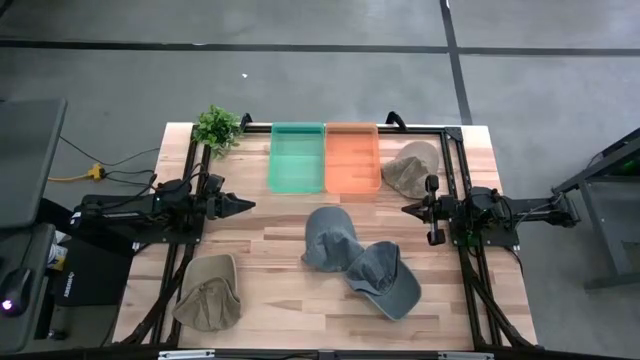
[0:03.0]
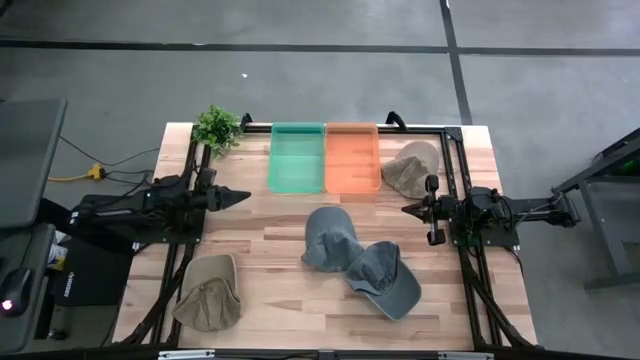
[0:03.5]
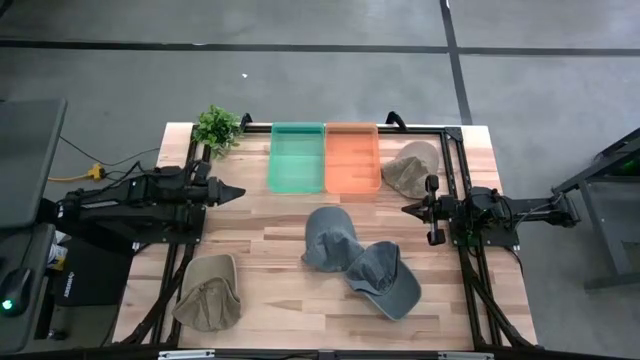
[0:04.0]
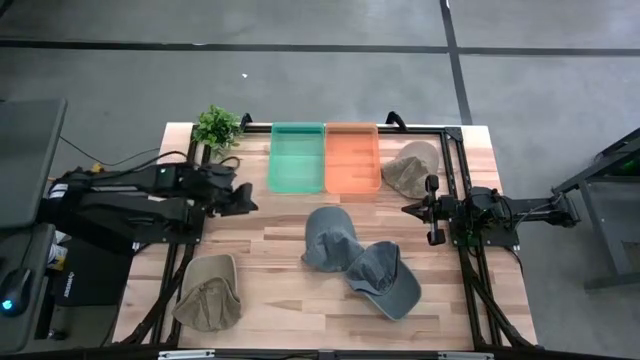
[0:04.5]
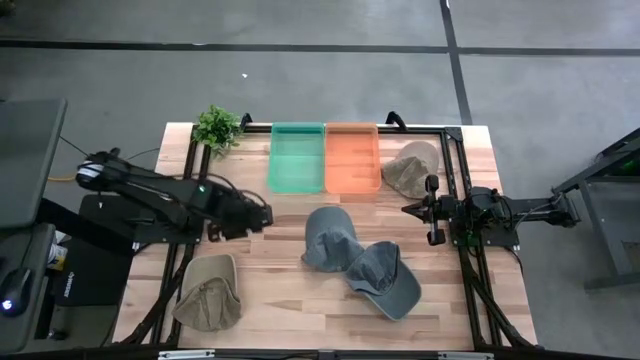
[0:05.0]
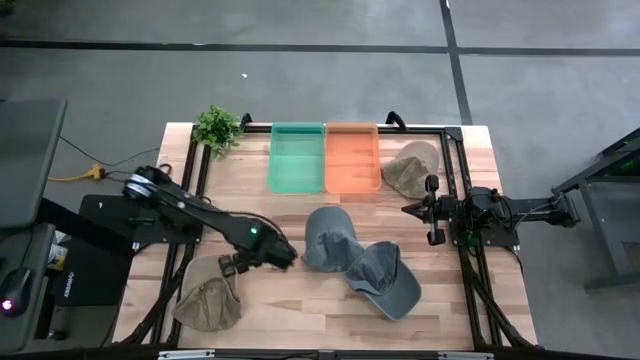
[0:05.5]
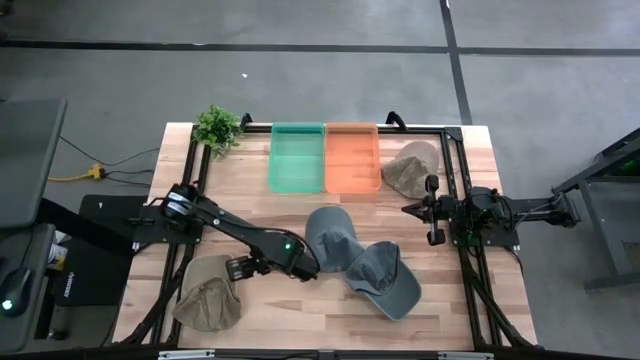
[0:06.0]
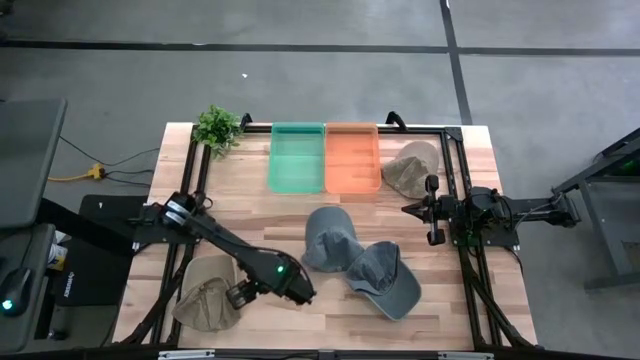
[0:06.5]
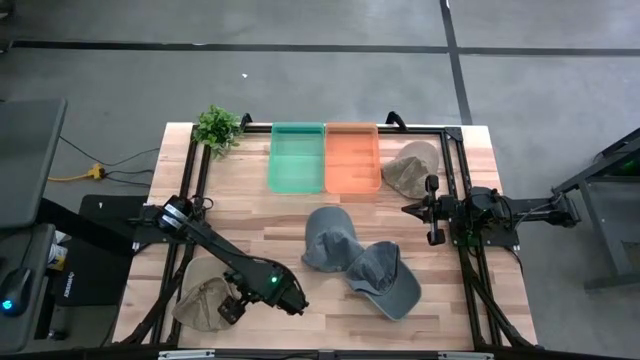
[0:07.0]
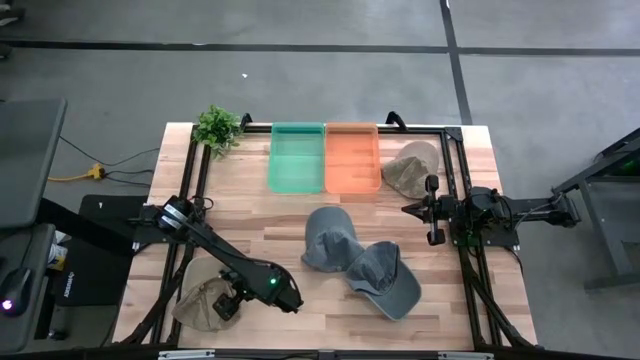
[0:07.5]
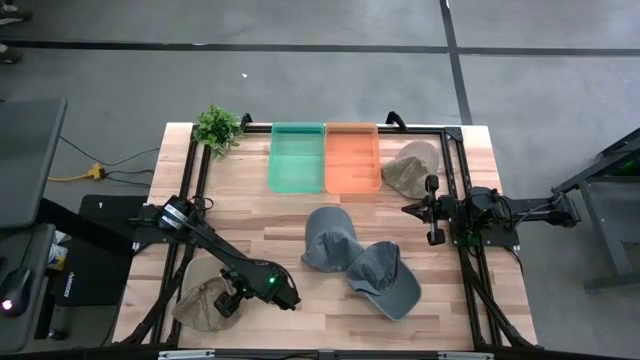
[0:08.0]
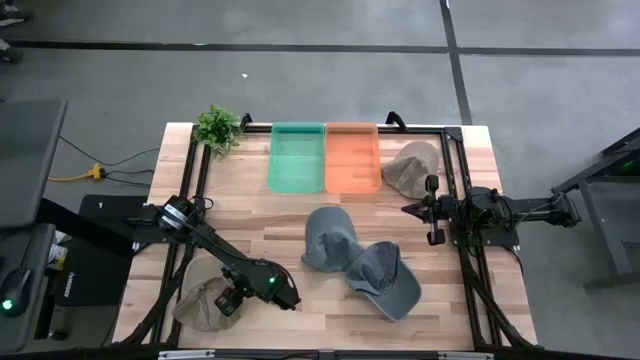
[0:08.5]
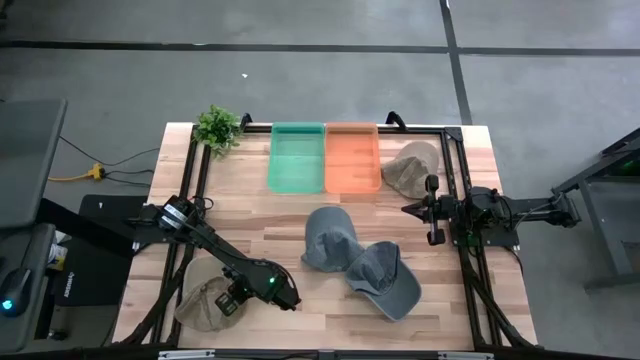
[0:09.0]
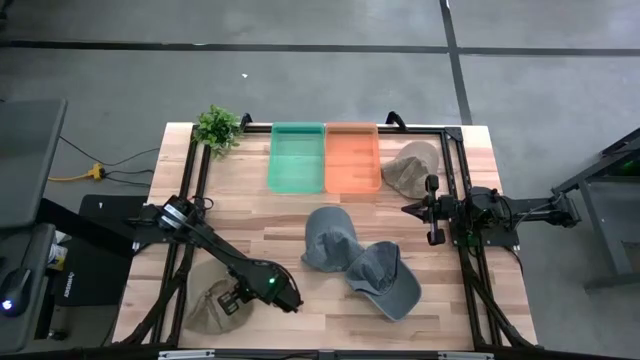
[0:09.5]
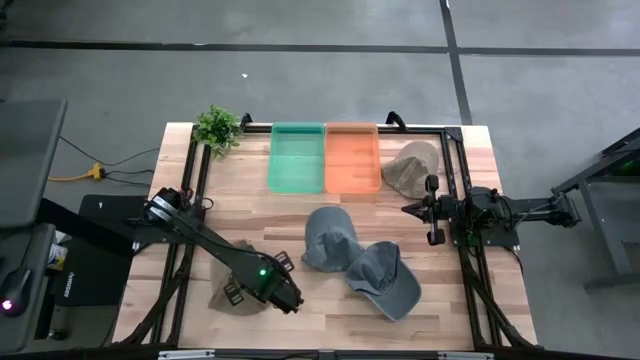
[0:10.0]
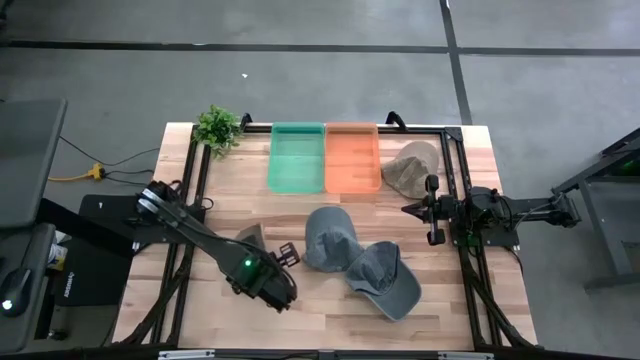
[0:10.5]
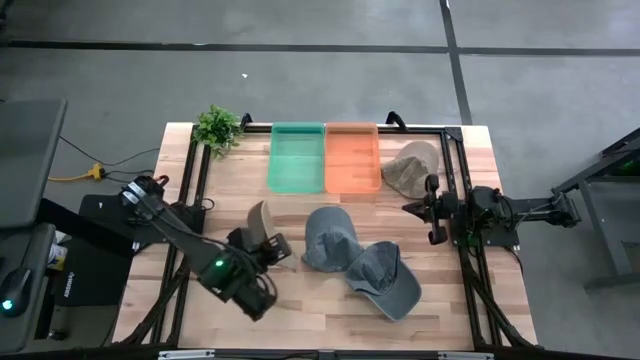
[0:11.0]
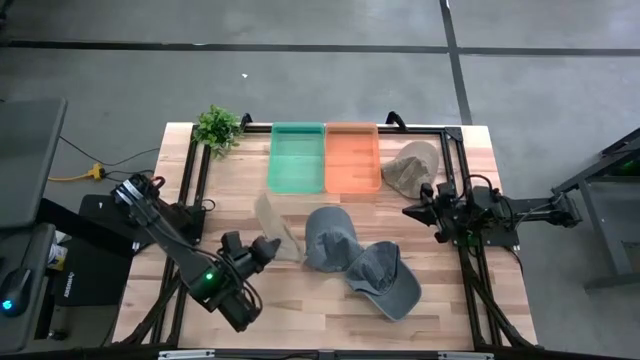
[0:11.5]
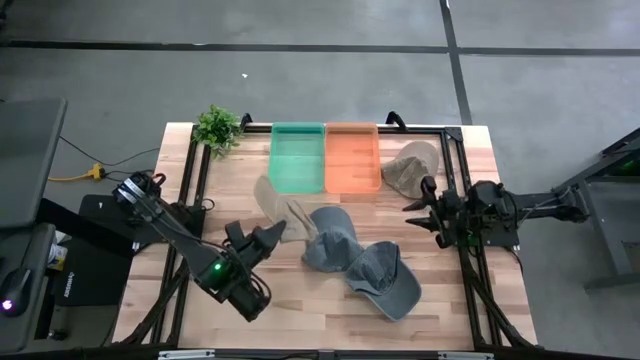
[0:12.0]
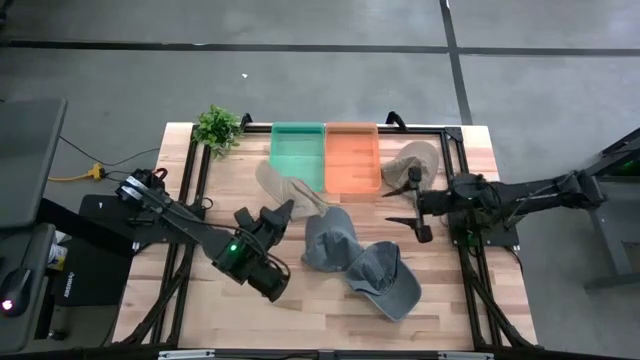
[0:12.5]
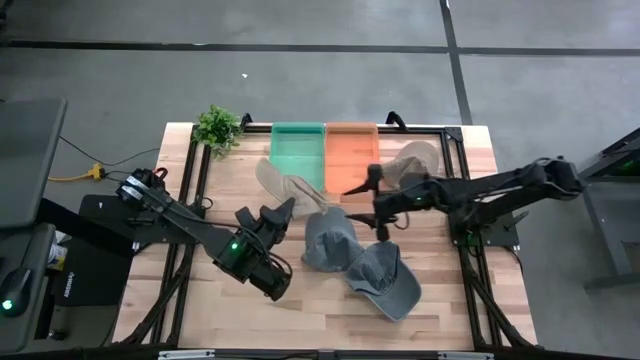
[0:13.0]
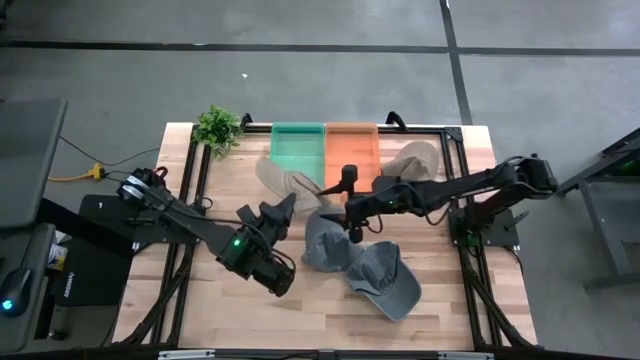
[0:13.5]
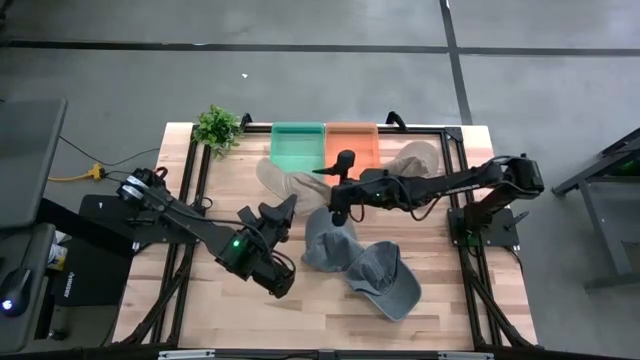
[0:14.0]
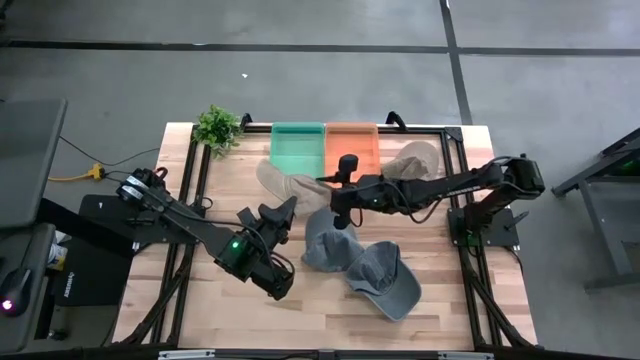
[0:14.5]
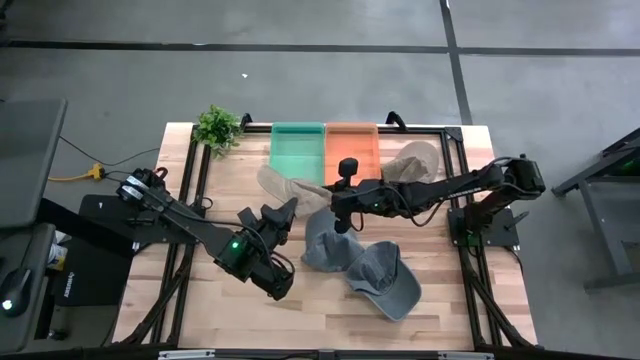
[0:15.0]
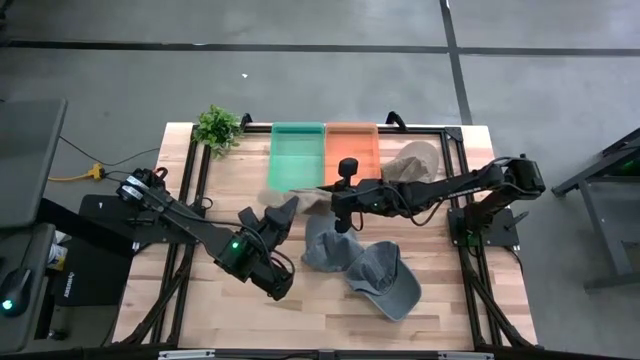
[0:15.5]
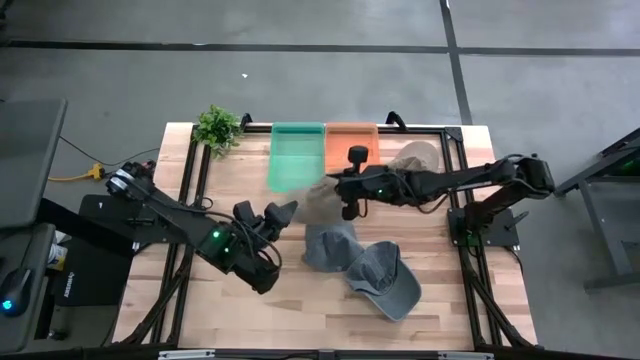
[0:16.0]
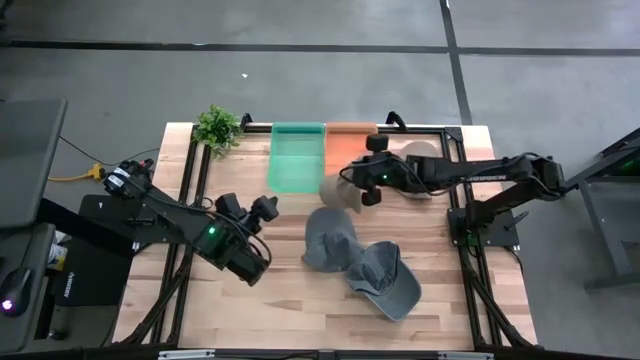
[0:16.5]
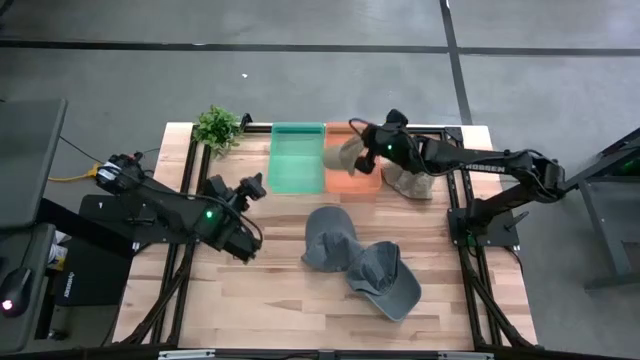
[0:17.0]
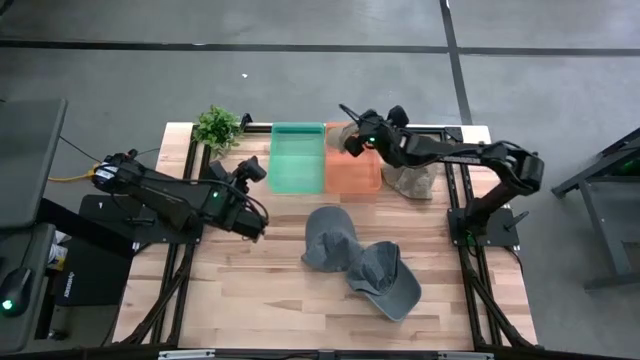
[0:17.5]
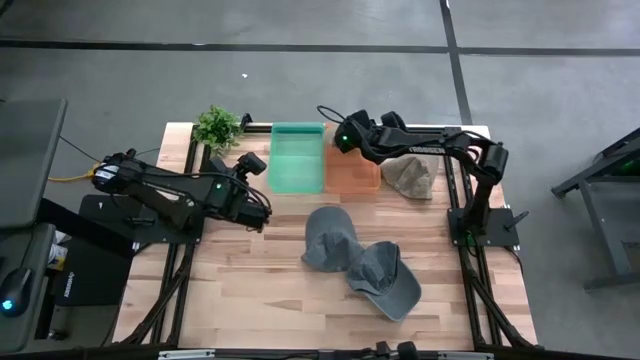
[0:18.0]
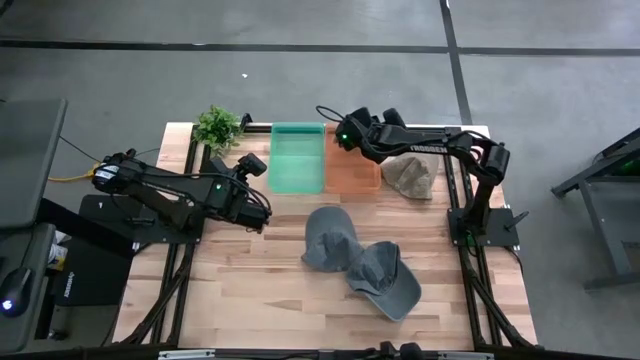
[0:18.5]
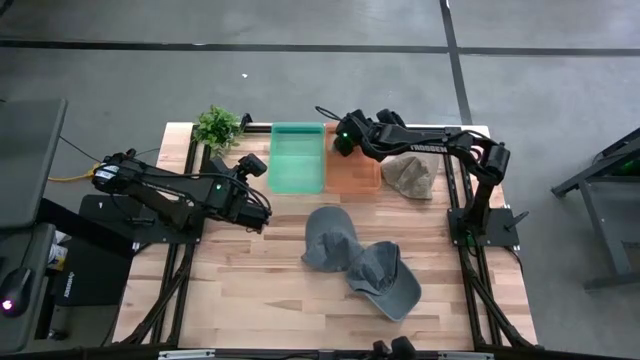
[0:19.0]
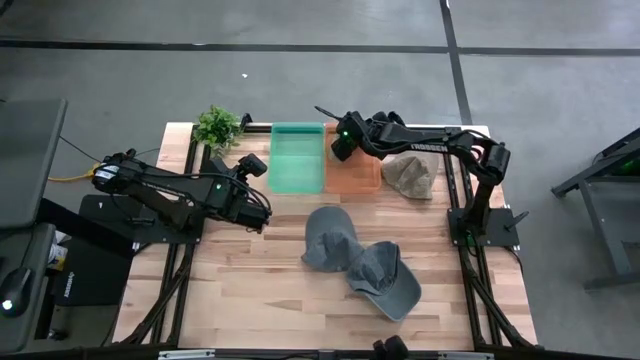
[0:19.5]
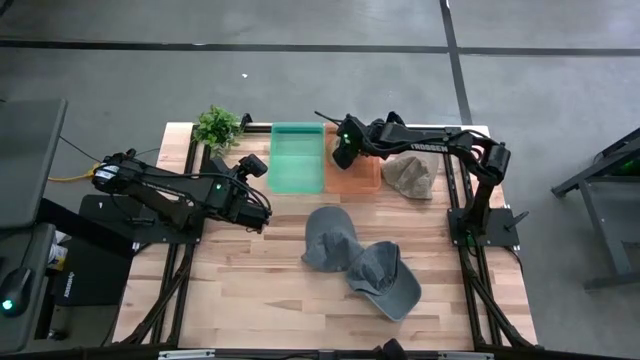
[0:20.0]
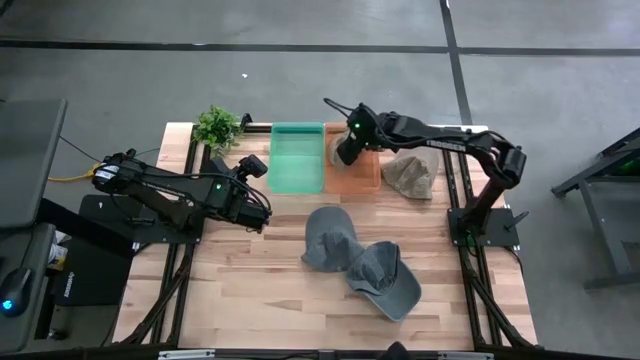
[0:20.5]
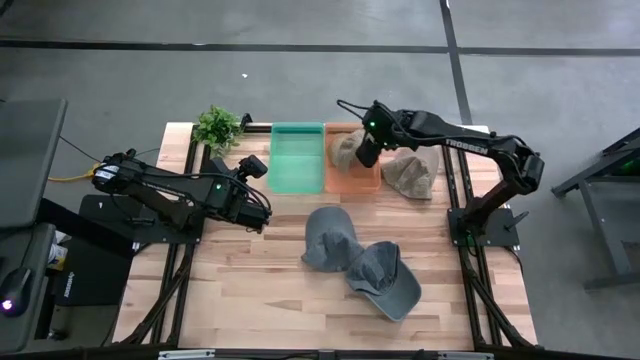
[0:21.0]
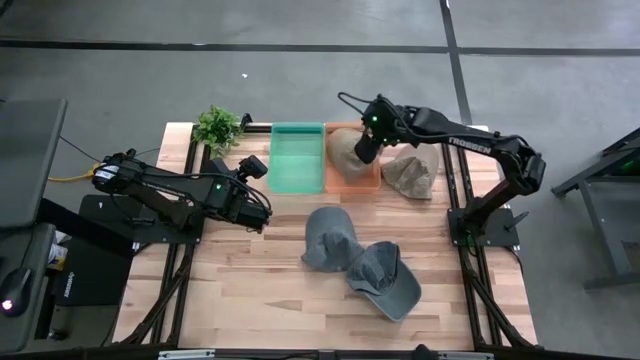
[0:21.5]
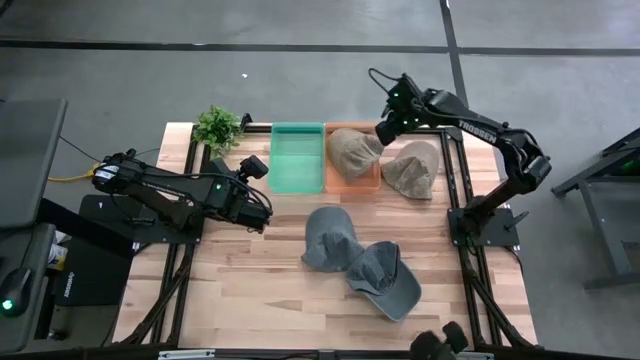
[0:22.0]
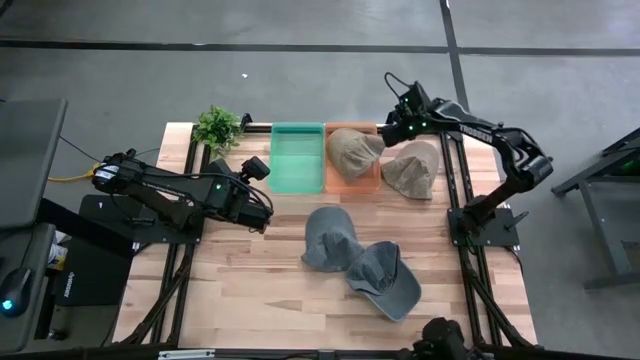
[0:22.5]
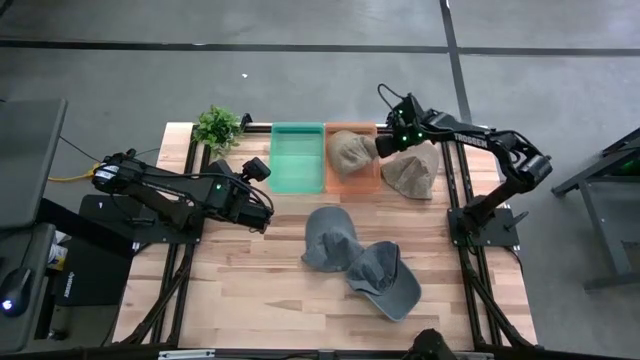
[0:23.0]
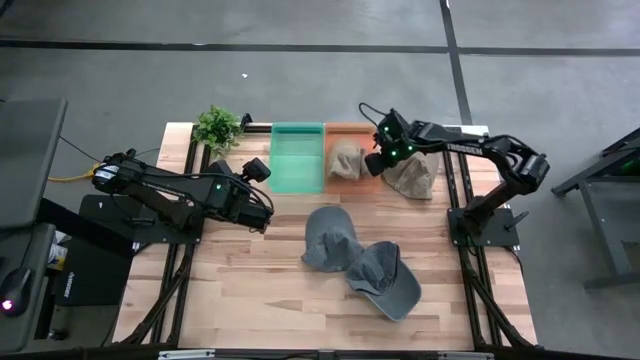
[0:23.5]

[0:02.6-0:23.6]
Task: Pick & Place hat
Put the bottom brown cap into the orange bin
